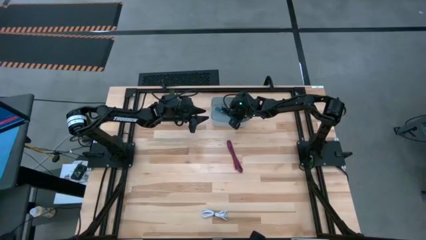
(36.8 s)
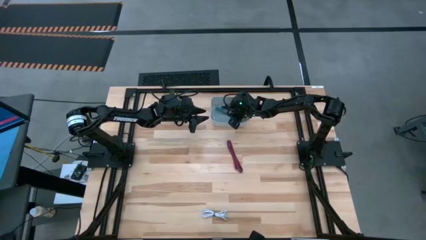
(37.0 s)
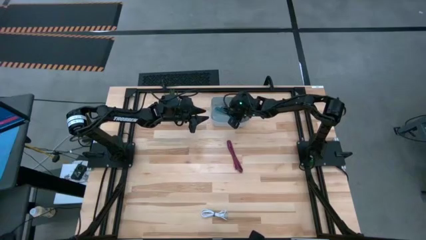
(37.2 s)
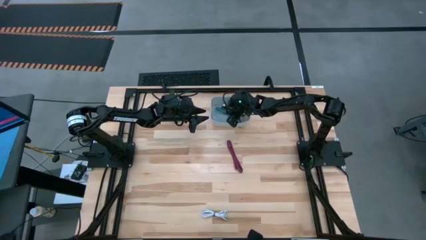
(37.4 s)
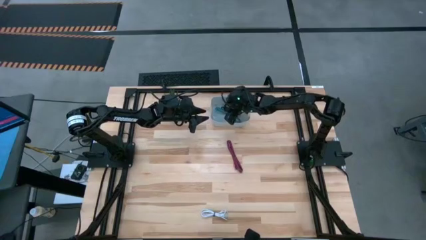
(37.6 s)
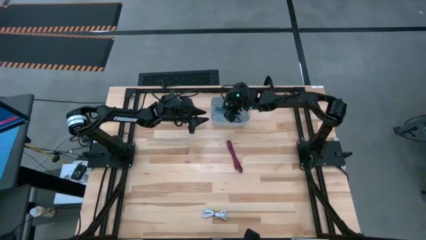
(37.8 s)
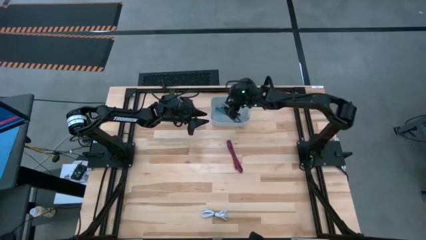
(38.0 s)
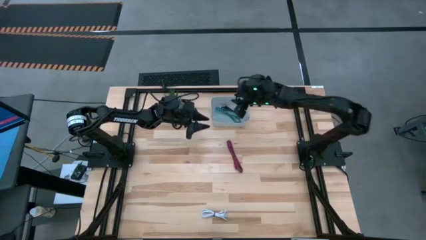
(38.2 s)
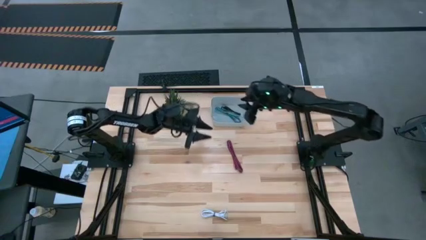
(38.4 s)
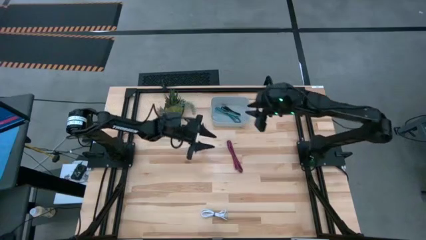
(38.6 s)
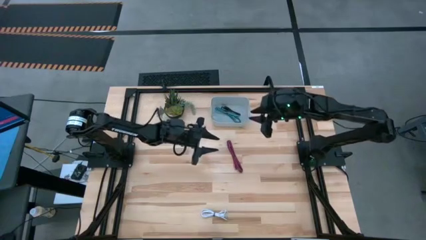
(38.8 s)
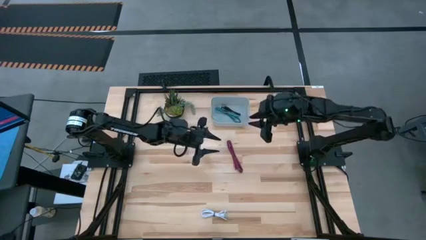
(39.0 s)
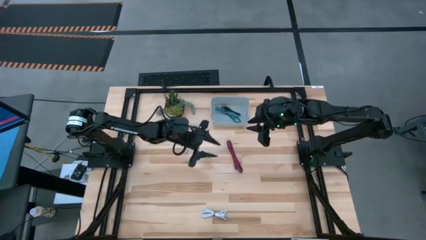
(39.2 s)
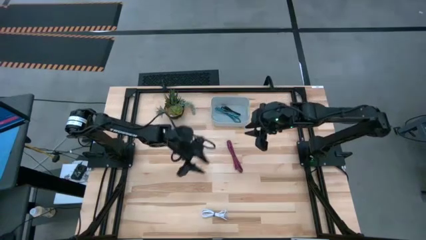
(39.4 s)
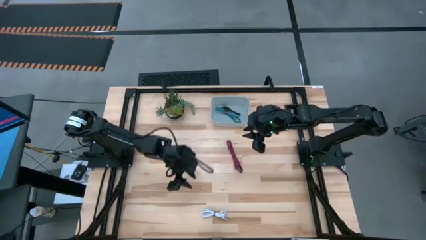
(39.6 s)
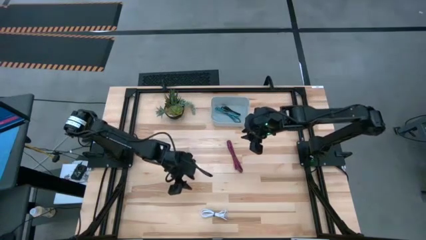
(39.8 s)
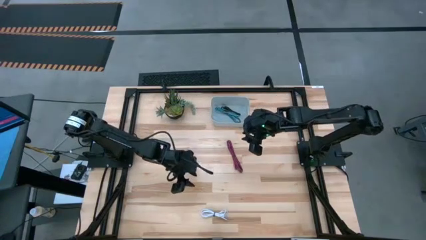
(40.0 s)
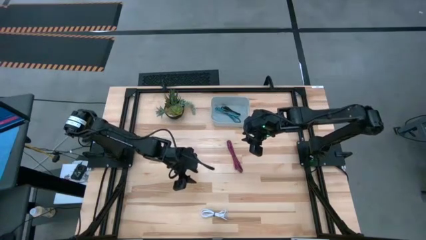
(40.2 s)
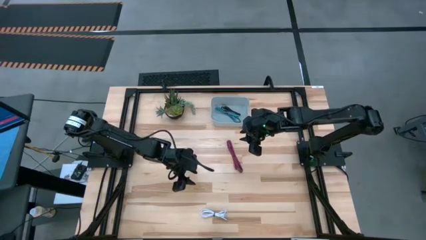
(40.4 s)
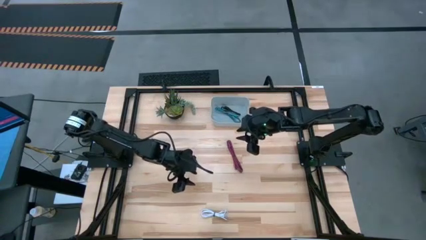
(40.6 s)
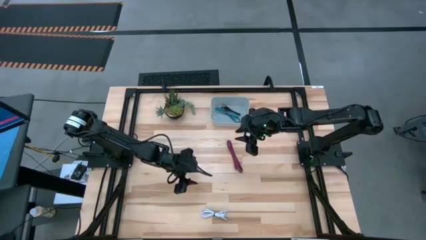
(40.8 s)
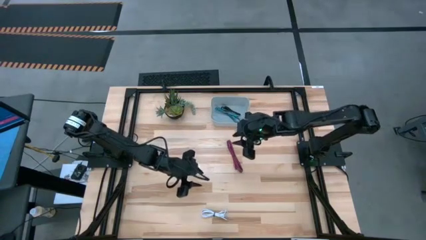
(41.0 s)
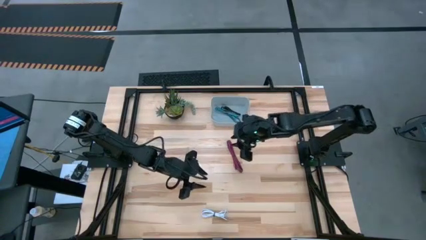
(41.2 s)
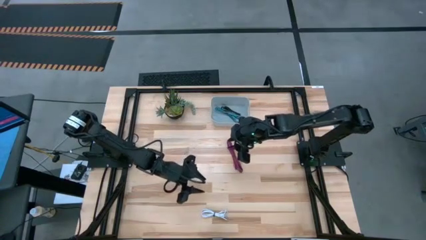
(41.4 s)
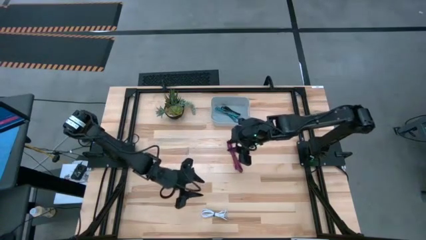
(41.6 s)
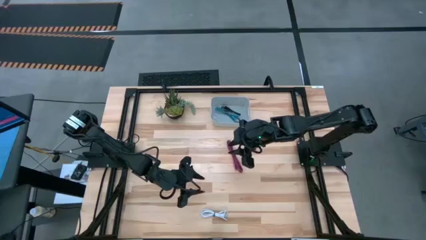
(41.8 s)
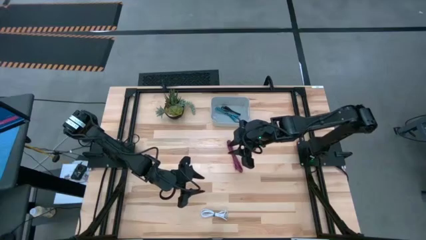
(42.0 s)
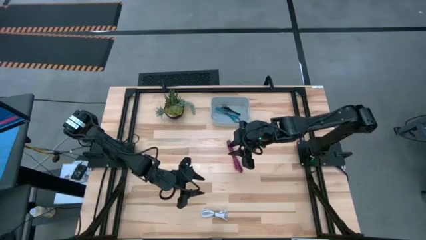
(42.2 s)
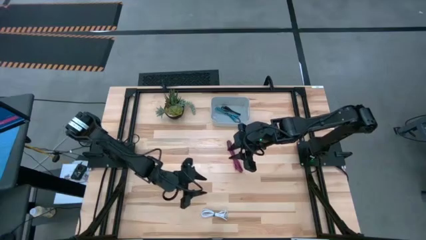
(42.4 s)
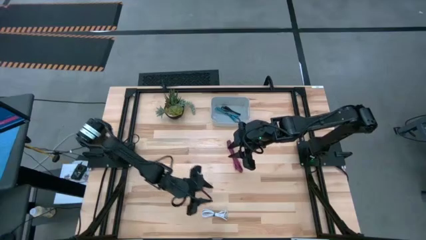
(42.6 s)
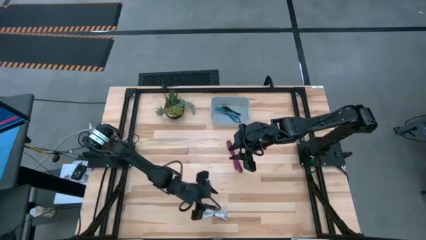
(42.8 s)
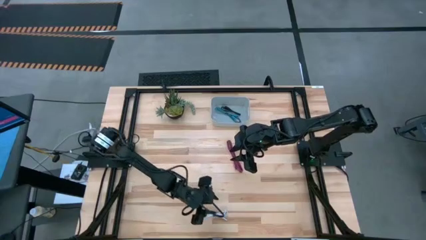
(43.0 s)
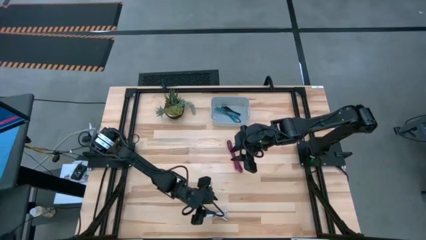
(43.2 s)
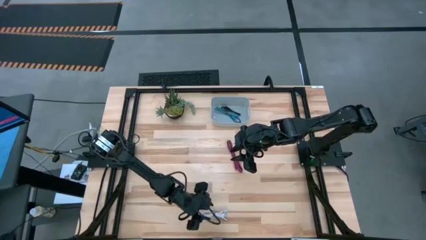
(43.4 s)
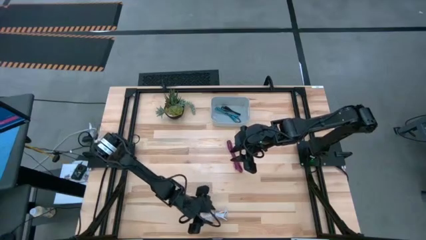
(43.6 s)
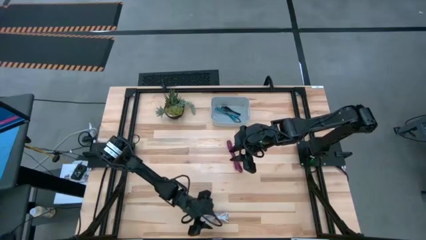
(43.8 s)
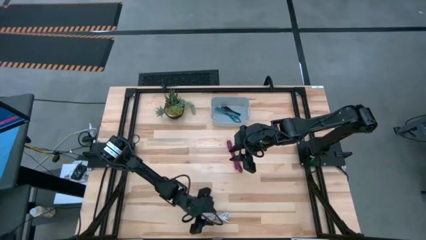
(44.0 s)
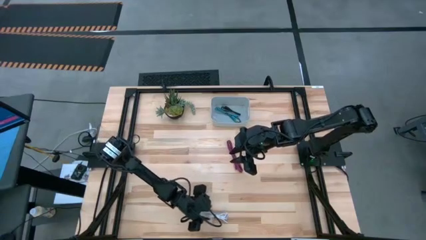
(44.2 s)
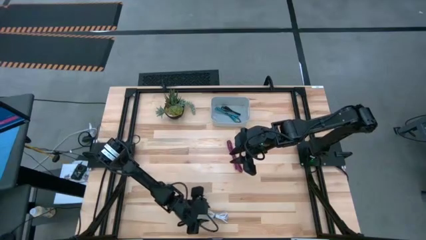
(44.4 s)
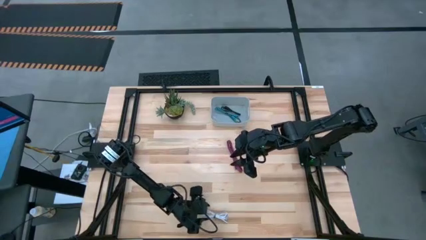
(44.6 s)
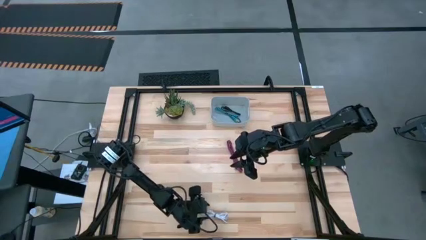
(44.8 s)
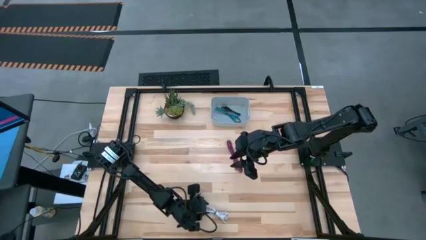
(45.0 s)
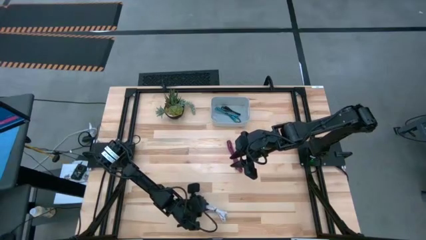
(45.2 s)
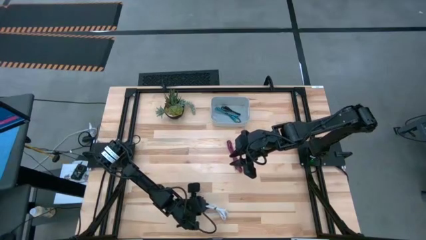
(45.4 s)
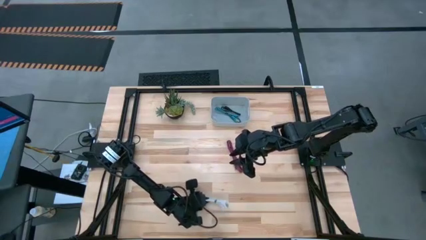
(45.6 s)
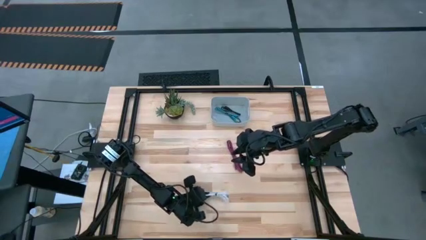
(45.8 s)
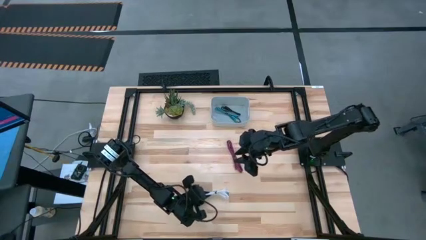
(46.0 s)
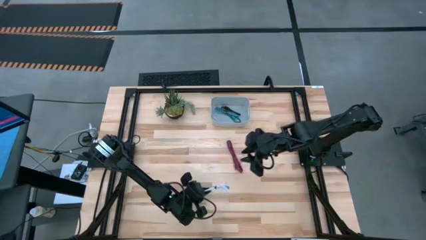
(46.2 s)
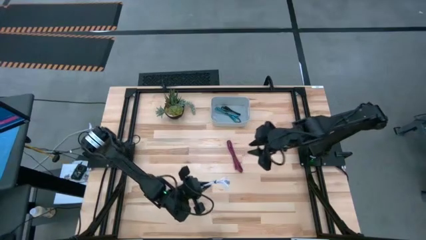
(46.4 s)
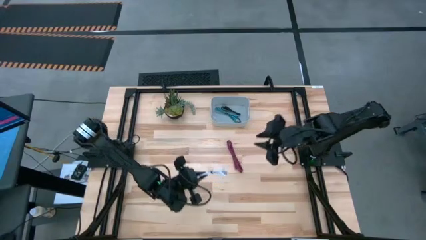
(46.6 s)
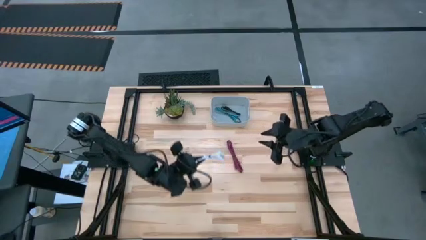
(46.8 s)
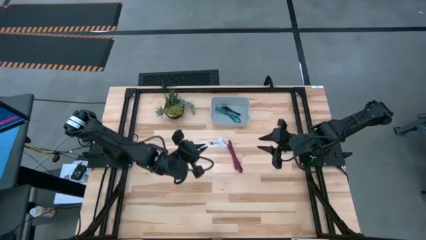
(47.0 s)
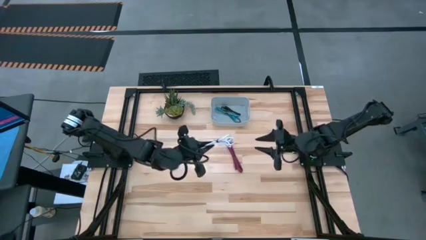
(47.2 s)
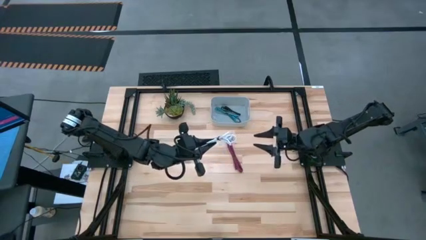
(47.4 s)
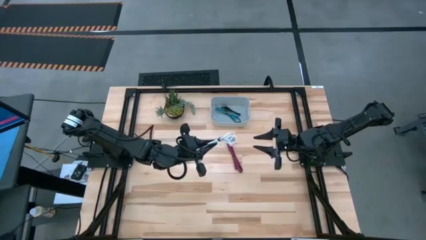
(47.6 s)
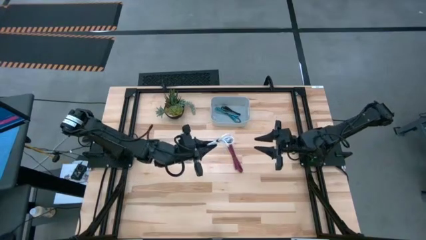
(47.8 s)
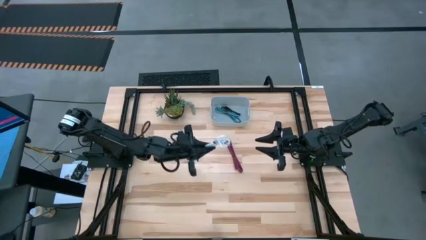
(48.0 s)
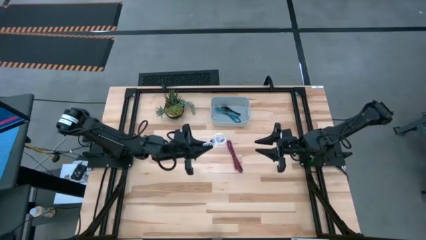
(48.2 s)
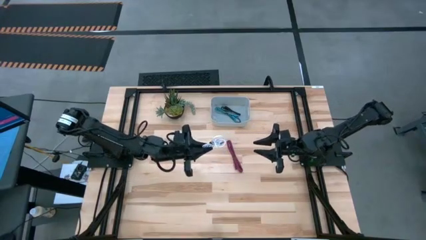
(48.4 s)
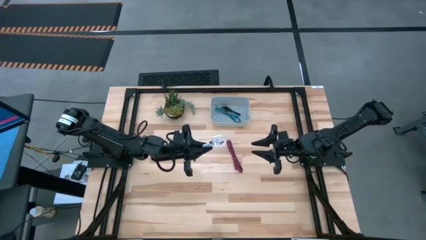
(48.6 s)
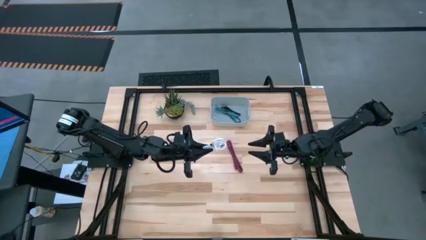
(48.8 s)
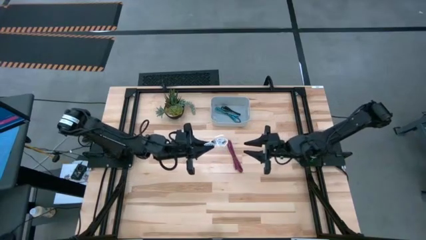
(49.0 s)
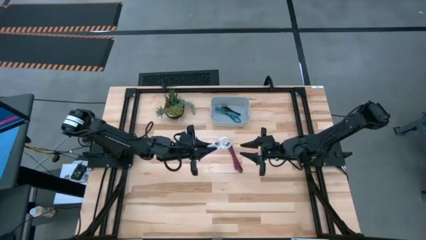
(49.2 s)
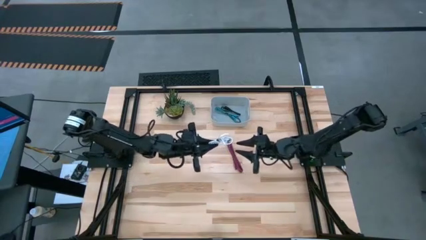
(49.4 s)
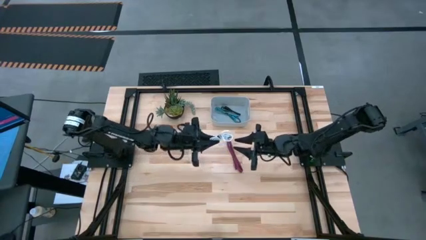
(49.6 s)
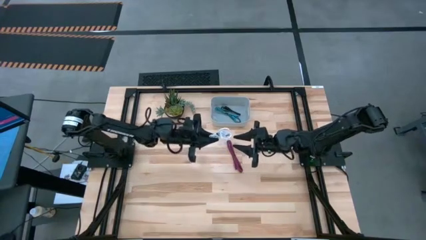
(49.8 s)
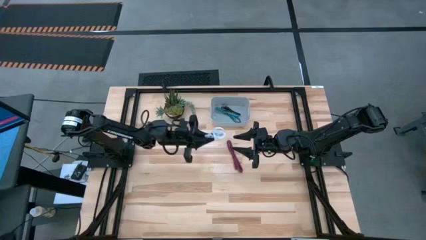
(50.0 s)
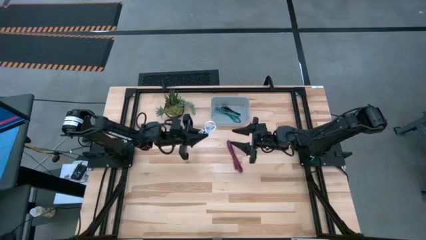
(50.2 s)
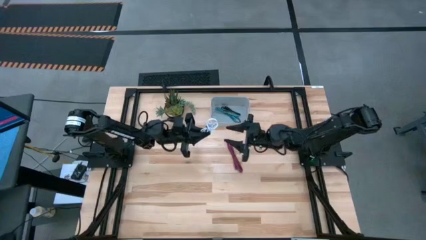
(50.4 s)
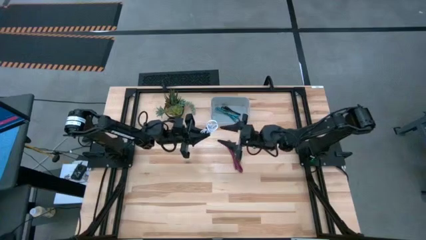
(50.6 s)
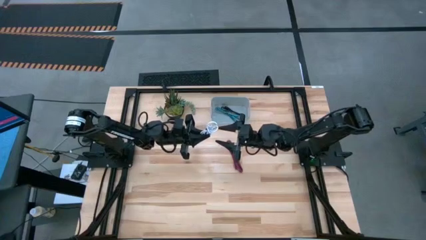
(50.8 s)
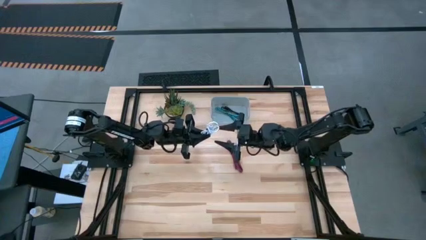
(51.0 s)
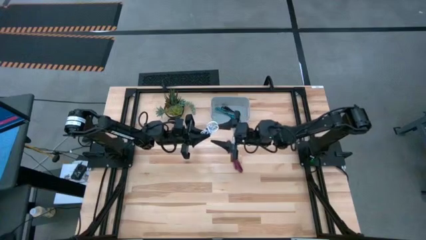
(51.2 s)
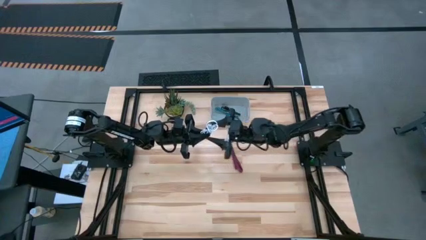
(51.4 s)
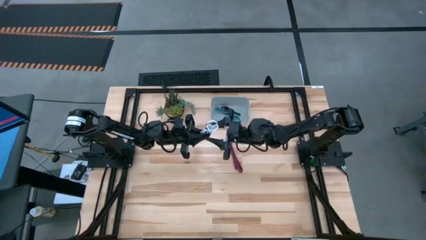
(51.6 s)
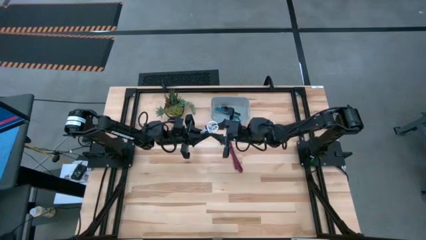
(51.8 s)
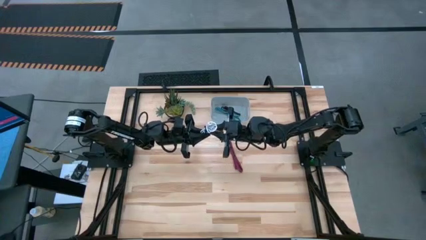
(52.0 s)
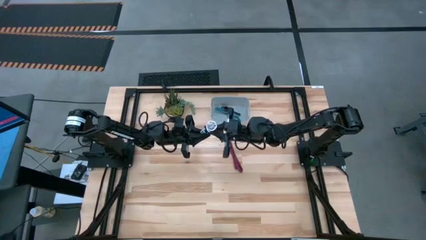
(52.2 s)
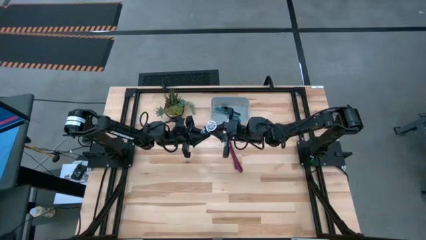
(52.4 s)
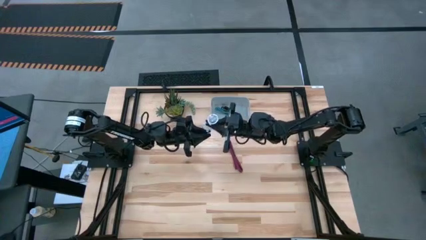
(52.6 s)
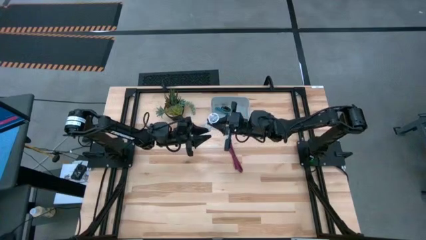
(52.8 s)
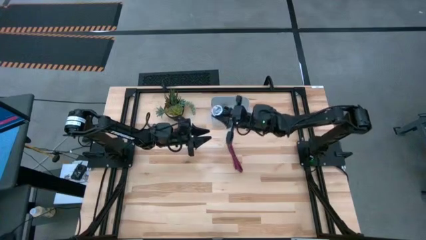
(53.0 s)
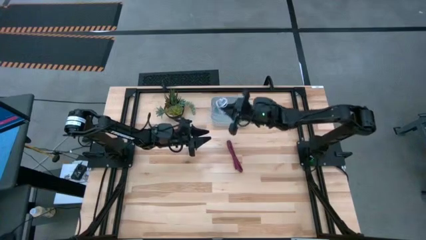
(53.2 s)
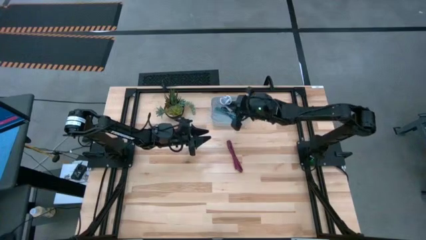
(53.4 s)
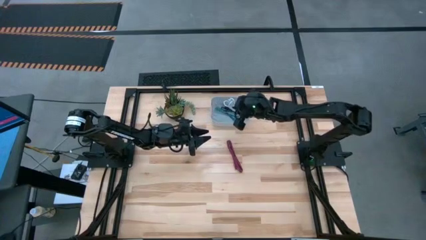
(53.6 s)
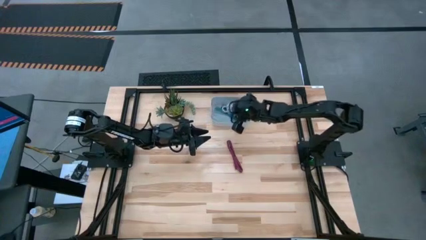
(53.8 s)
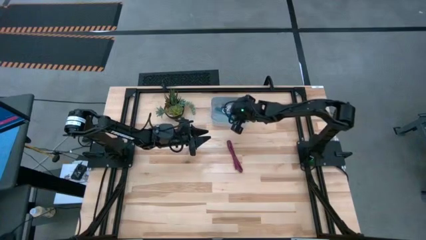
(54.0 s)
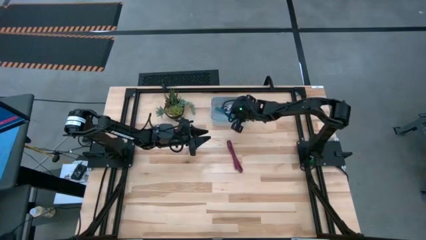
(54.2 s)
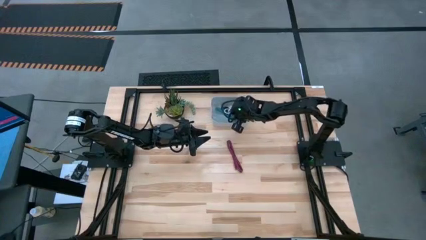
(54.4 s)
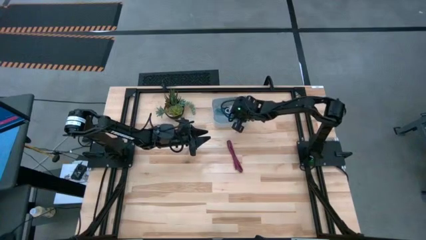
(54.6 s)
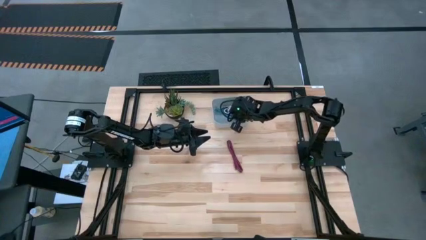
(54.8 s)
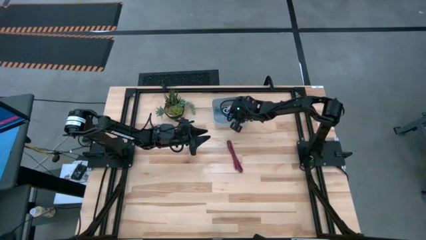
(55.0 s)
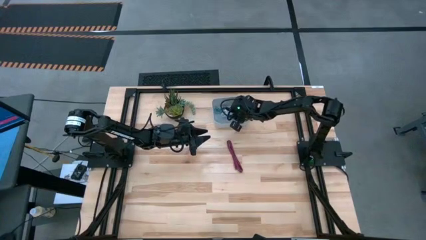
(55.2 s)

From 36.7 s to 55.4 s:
Task: Pick and place USB-C Cables
Put the white charger cable into the white bin
